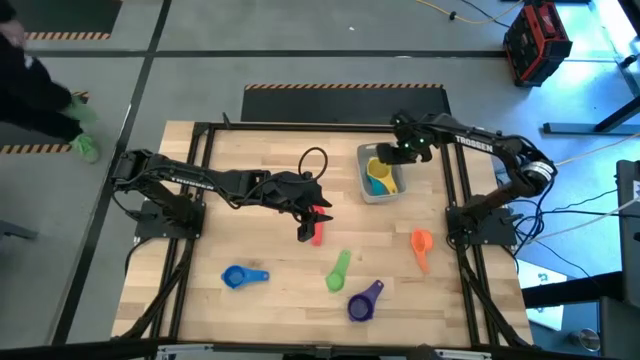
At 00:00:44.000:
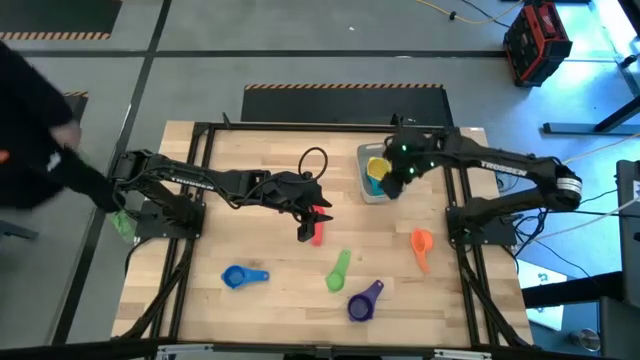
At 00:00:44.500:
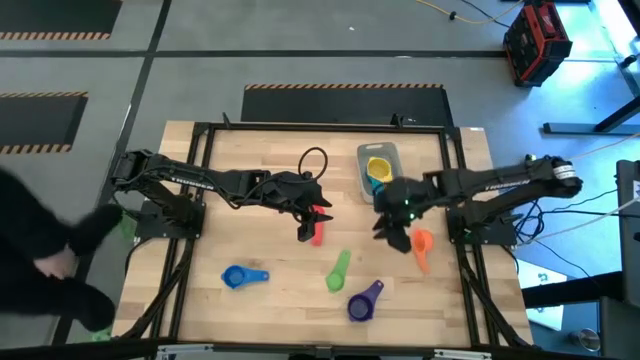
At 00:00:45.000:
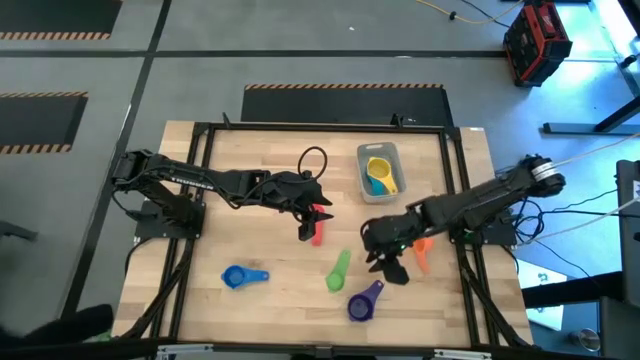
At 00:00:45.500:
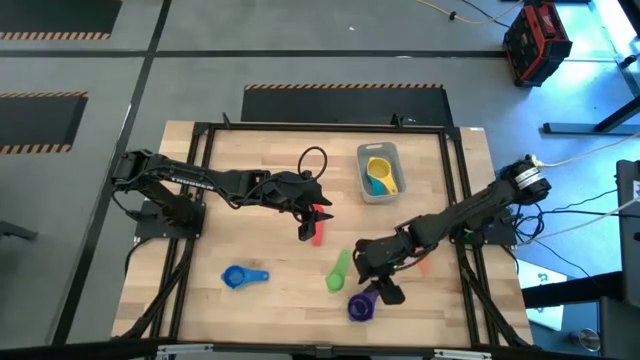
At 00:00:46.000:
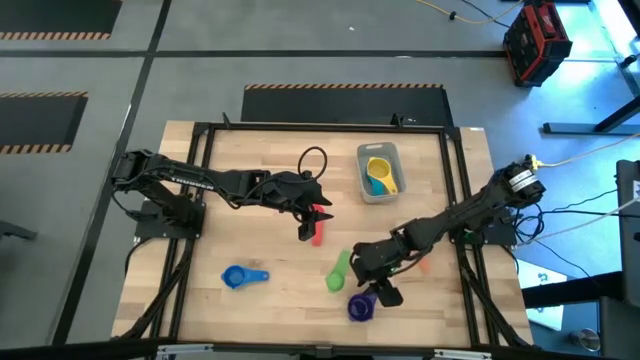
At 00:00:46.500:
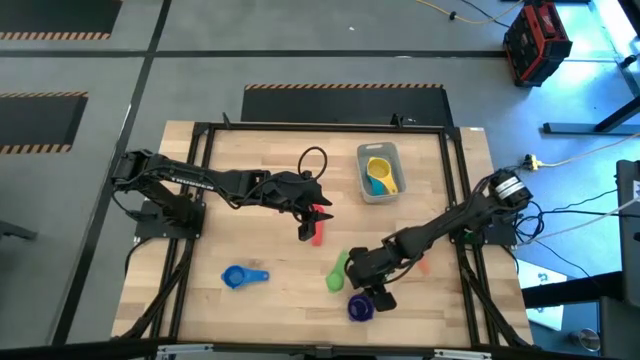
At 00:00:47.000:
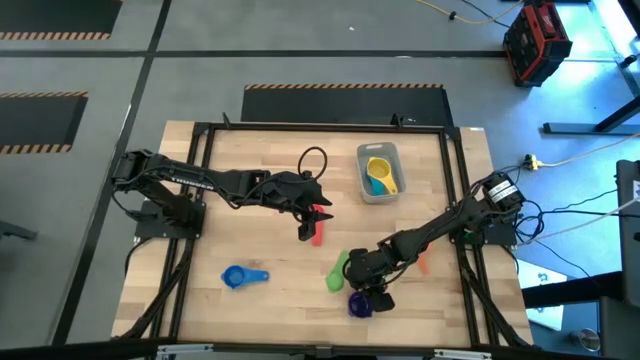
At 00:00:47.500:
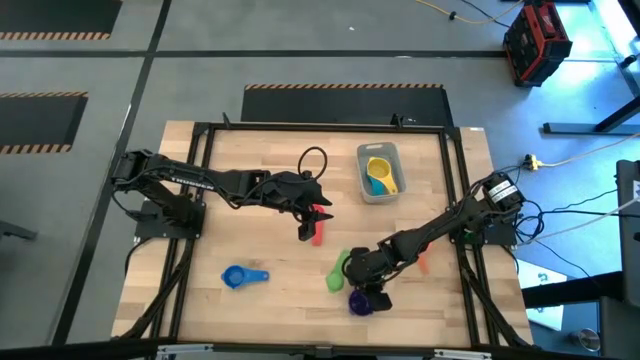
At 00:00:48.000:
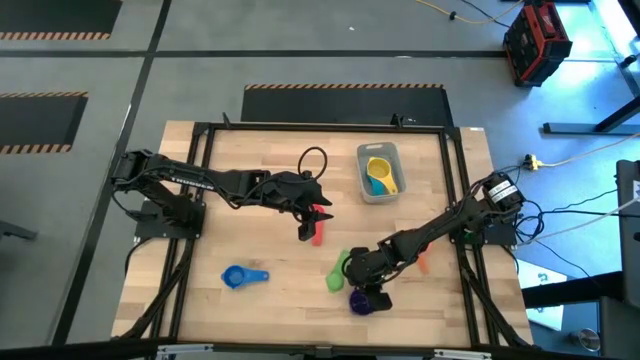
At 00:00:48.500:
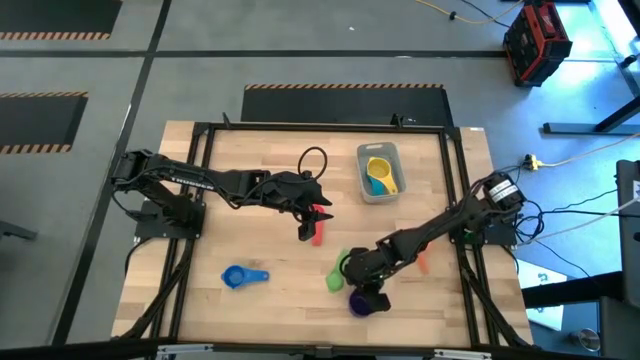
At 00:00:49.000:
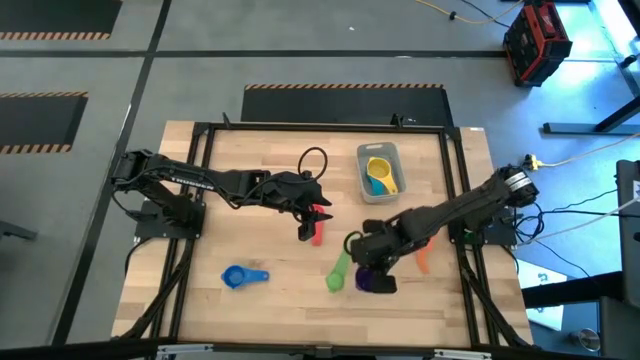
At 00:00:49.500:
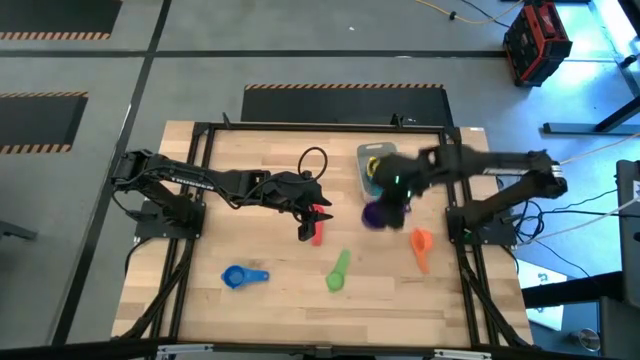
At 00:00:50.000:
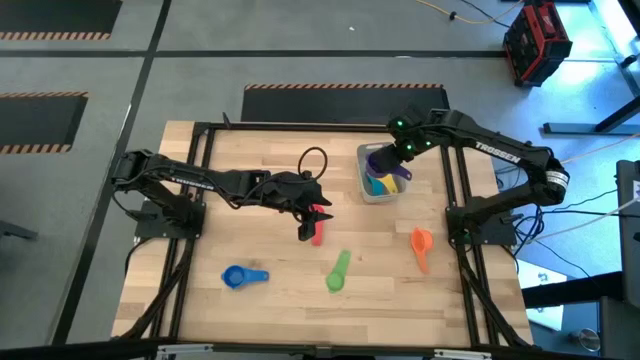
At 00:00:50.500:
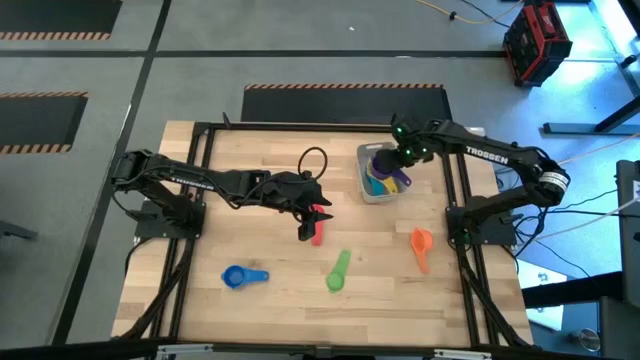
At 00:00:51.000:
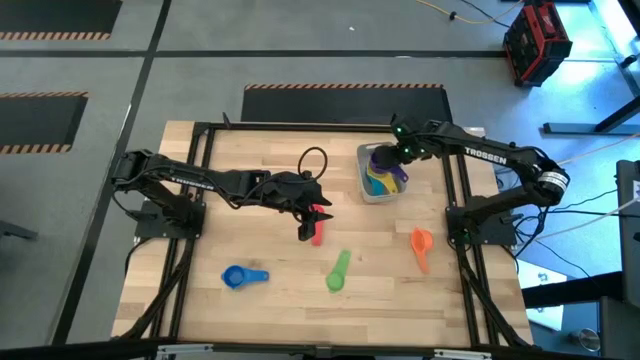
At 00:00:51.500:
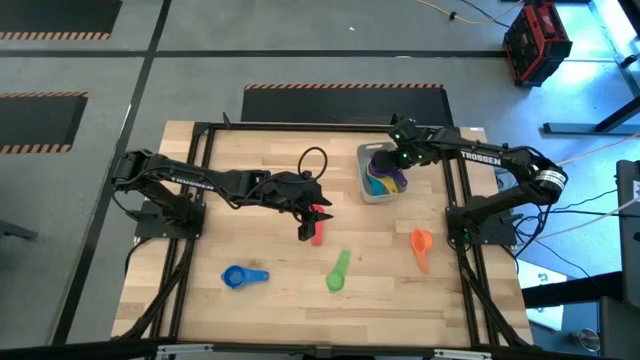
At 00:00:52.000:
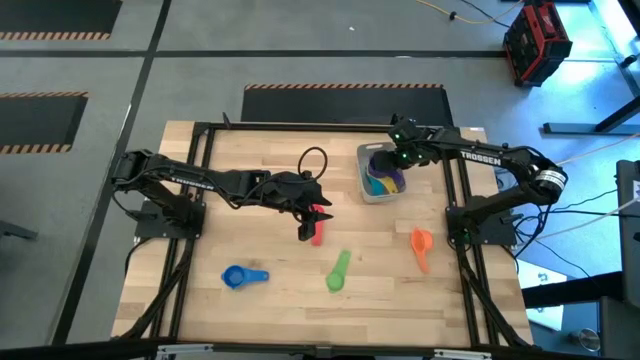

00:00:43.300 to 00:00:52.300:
Task: Nest measuring cups in basket
Stack the dark blue measuring cup on top of the yellow measuring cup in the grey bin

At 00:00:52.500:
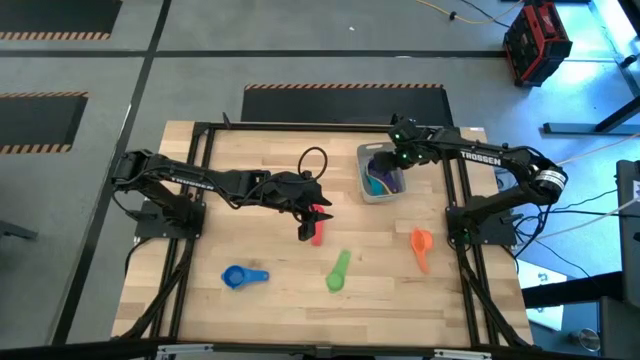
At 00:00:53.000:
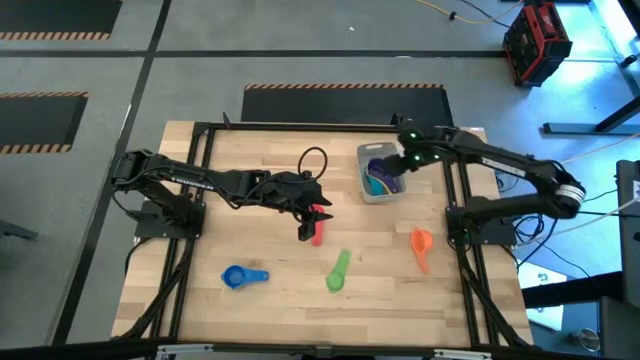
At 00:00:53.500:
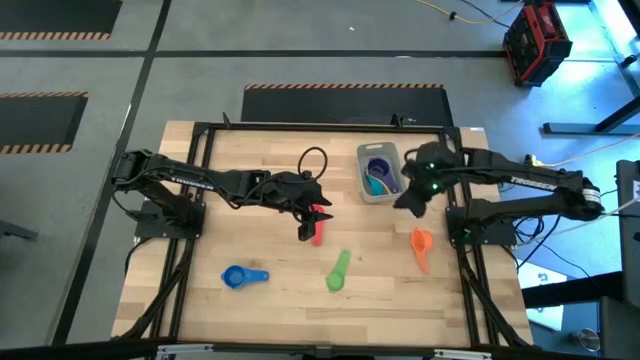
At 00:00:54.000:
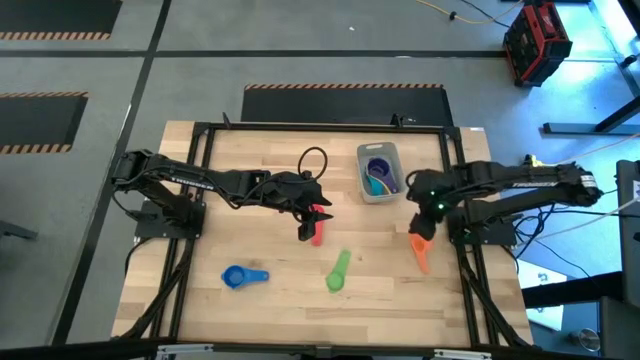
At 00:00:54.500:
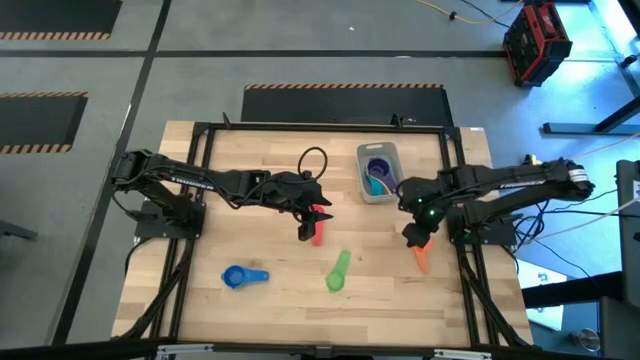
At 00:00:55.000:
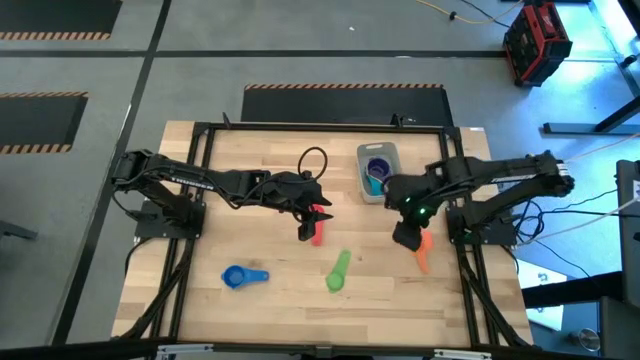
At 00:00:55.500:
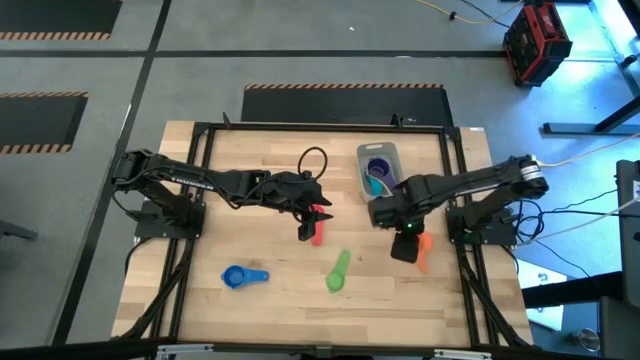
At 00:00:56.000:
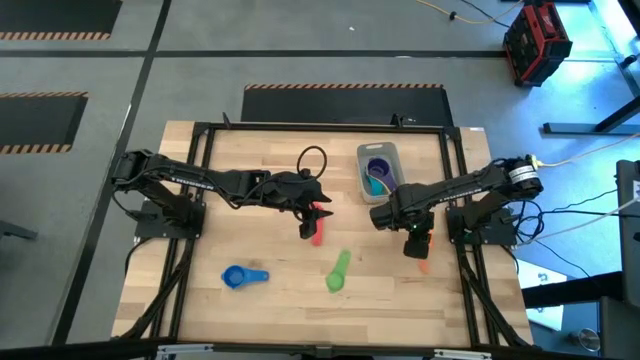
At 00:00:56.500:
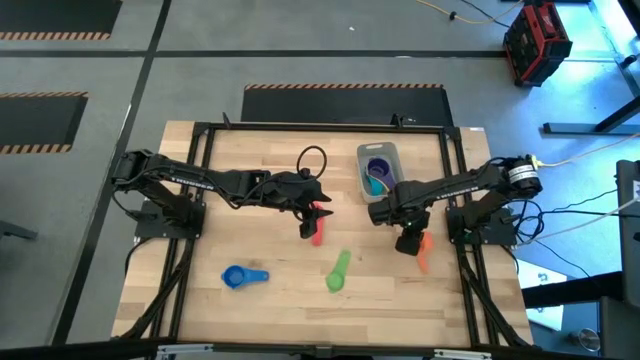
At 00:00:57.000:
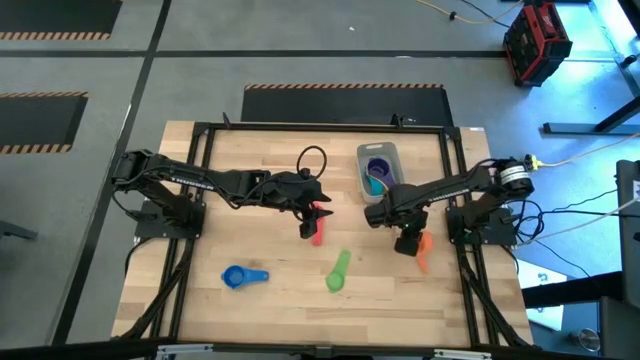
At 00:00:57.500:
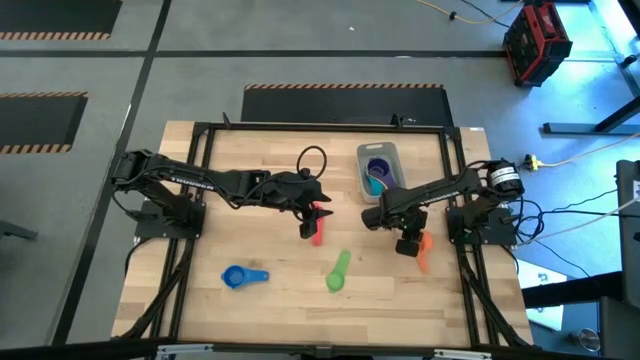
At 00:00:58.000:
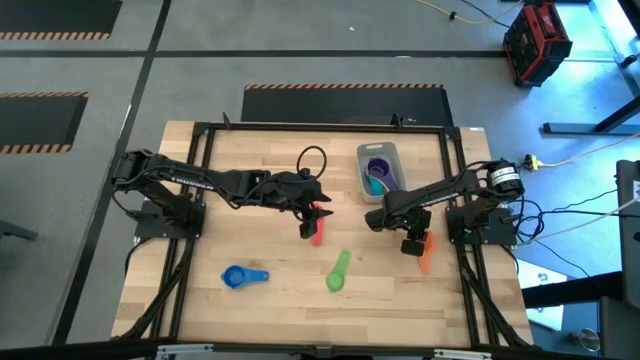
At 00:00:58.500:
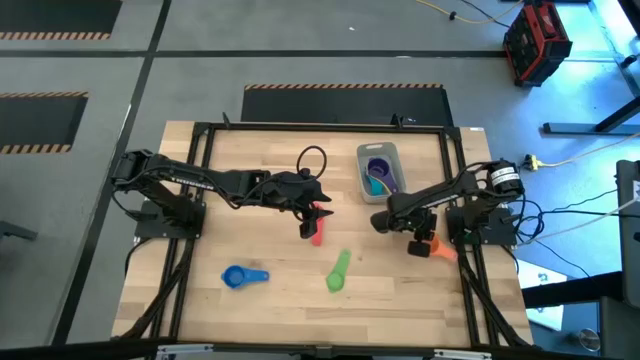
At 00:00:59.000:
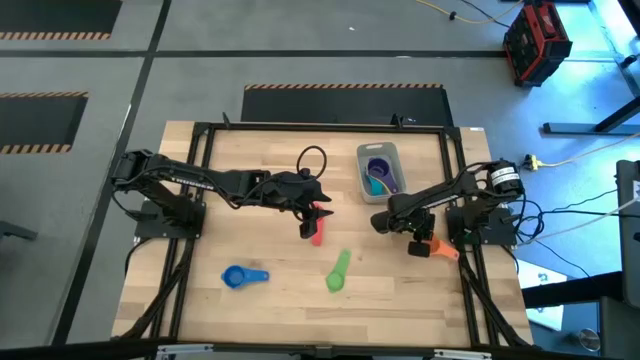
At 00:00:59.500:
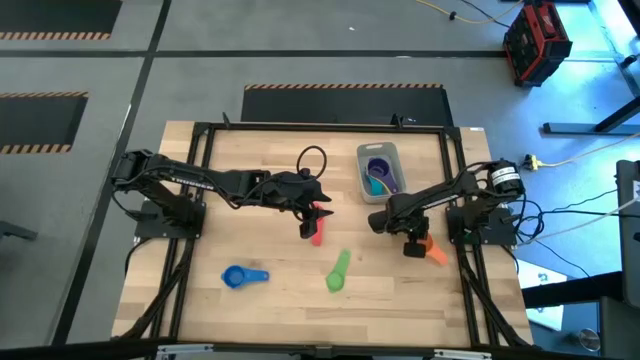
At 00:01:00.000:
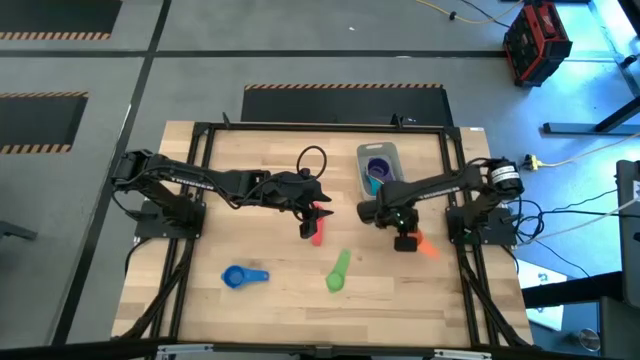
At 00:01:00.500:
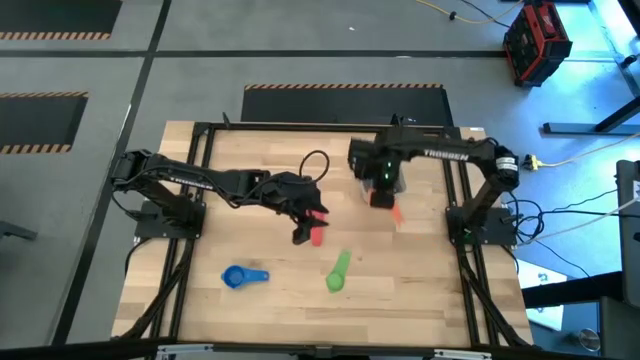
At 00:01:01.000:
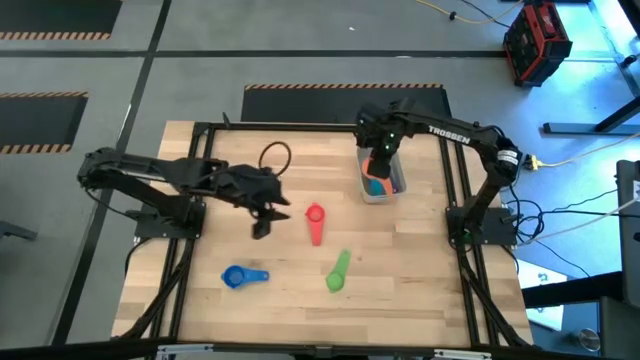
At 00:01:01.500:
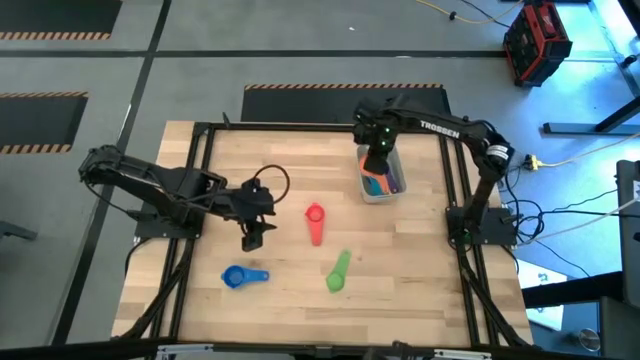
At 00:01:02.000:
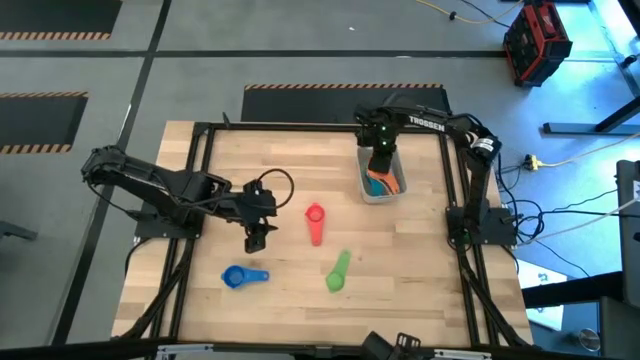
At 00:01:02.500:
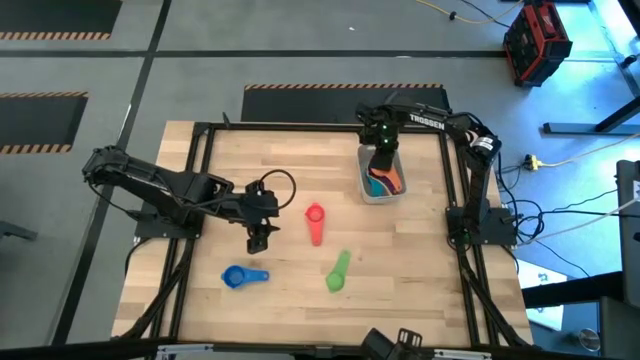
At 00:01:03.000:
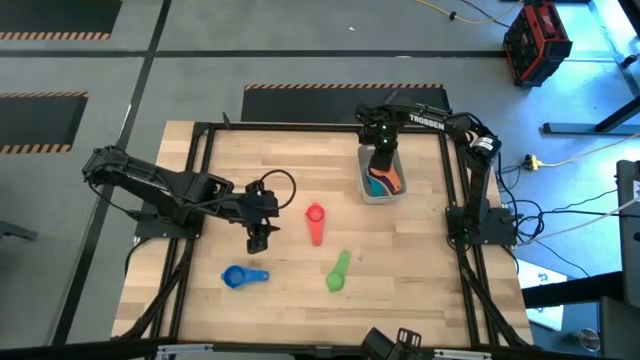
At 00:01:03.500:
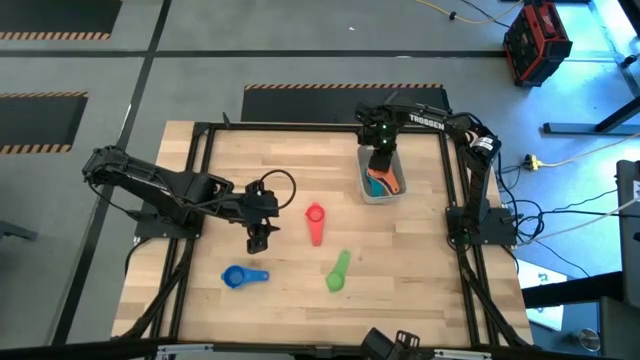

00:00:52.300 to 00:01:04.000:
Stack the orange measuring cup on top of the dark blue measuring cup in the grey bin
